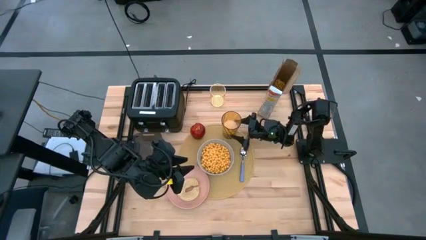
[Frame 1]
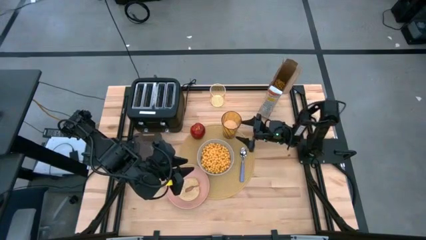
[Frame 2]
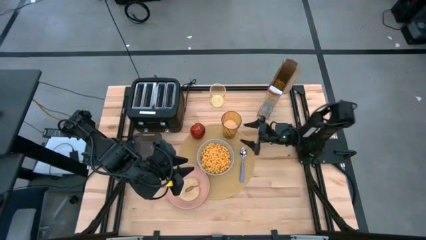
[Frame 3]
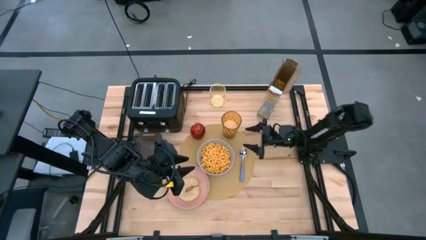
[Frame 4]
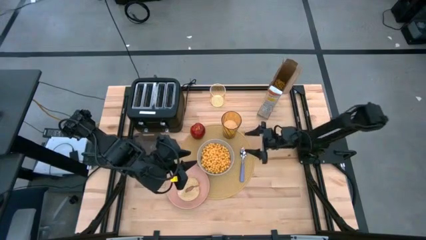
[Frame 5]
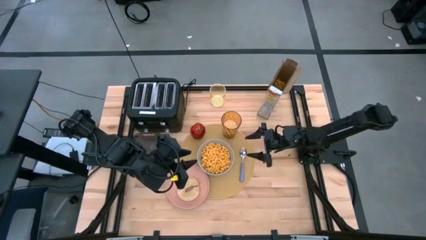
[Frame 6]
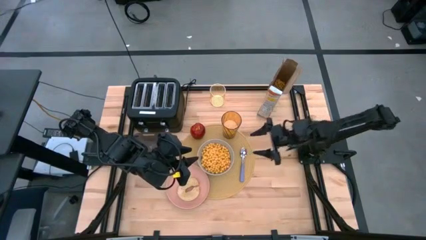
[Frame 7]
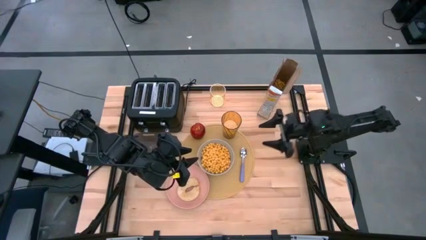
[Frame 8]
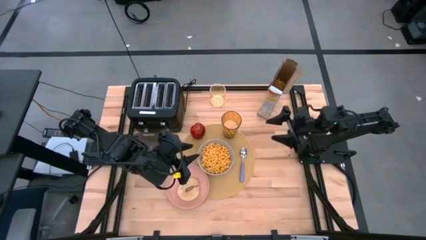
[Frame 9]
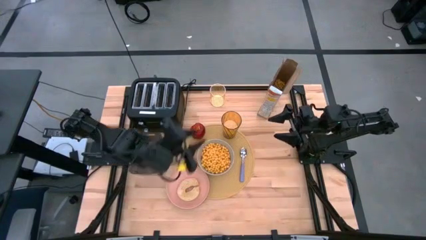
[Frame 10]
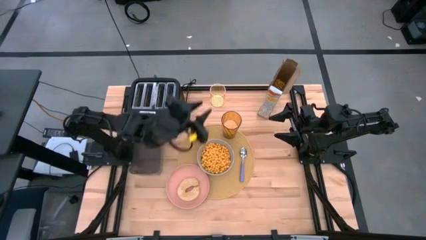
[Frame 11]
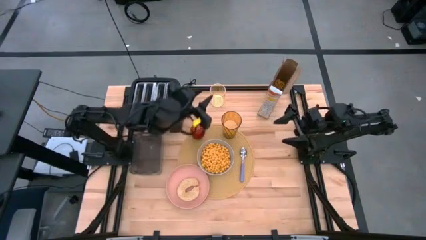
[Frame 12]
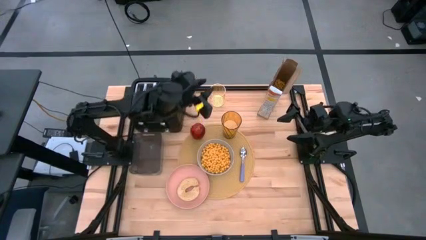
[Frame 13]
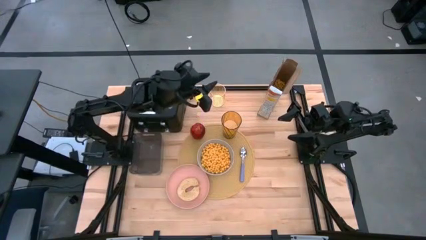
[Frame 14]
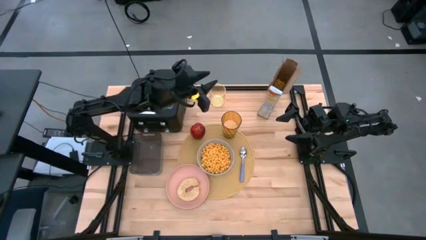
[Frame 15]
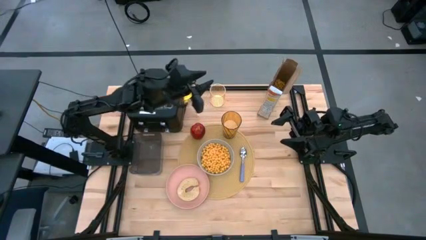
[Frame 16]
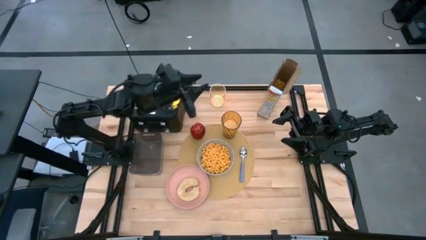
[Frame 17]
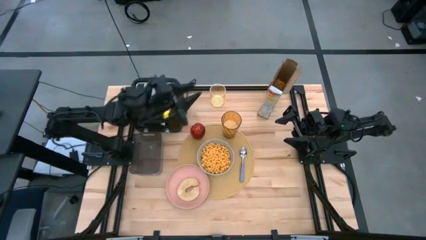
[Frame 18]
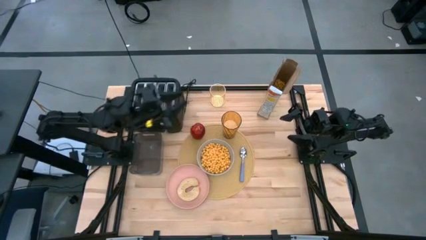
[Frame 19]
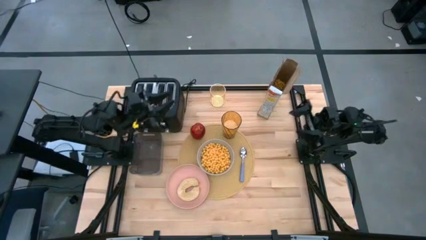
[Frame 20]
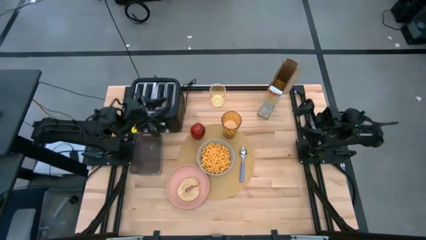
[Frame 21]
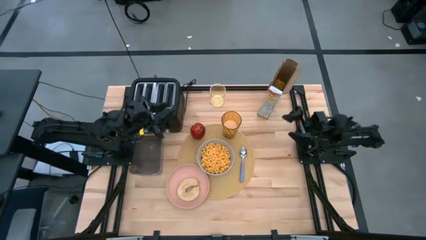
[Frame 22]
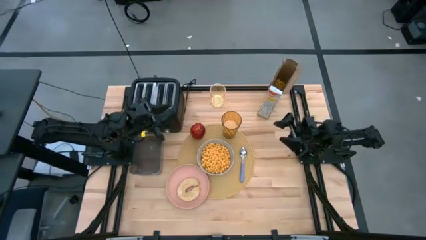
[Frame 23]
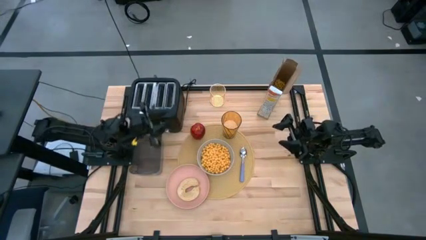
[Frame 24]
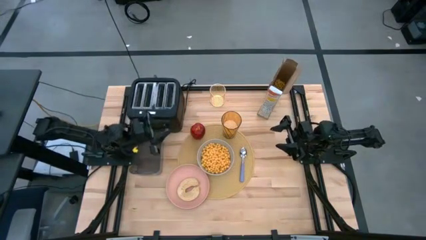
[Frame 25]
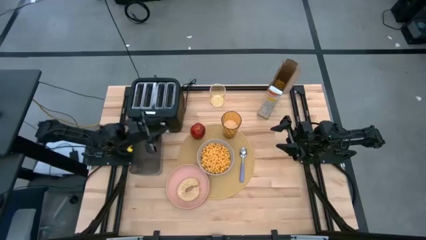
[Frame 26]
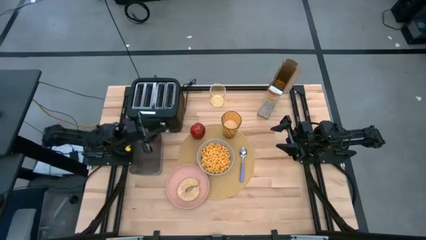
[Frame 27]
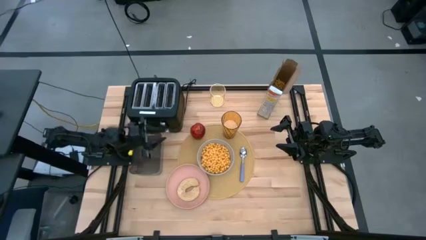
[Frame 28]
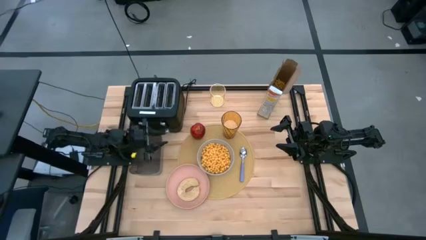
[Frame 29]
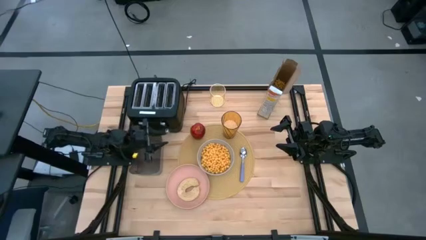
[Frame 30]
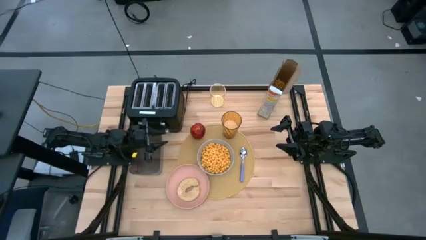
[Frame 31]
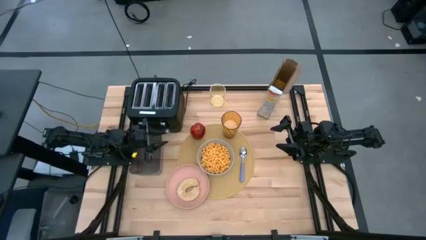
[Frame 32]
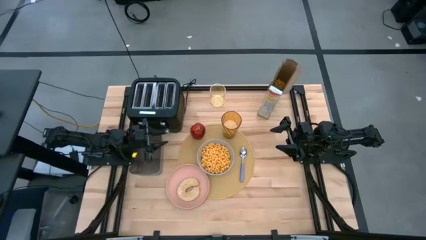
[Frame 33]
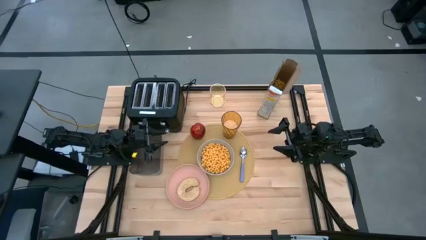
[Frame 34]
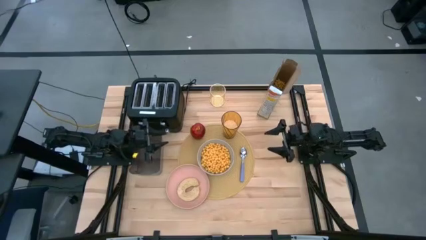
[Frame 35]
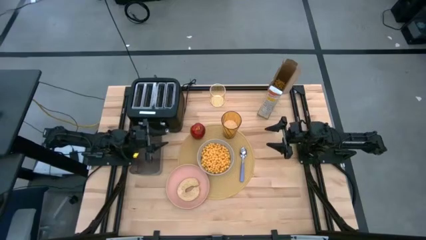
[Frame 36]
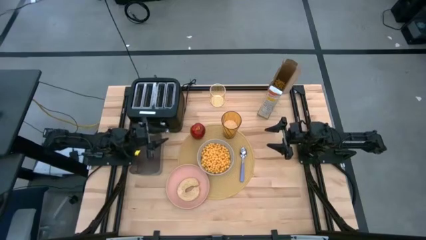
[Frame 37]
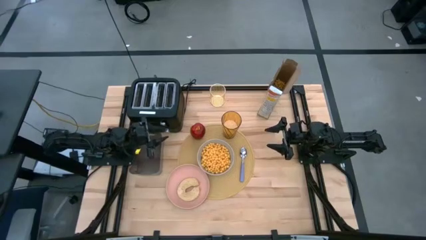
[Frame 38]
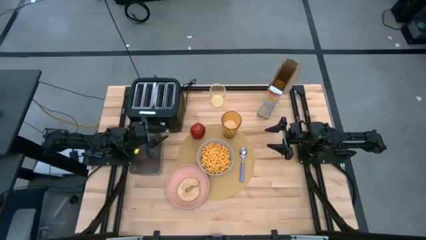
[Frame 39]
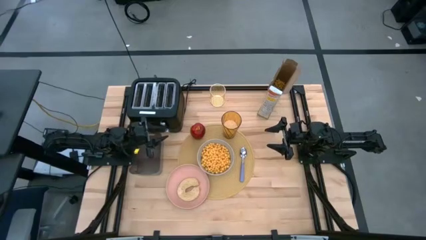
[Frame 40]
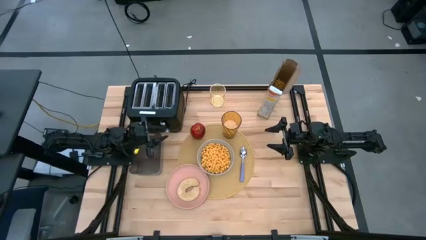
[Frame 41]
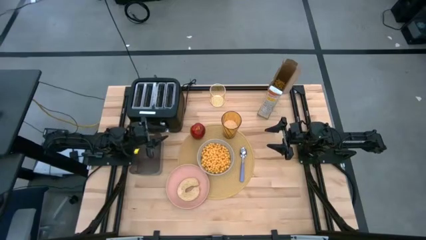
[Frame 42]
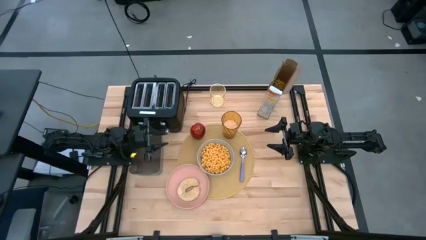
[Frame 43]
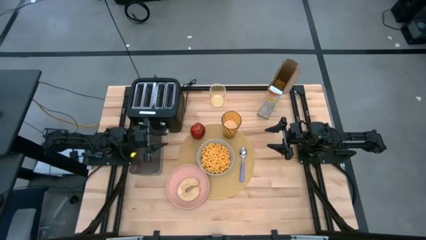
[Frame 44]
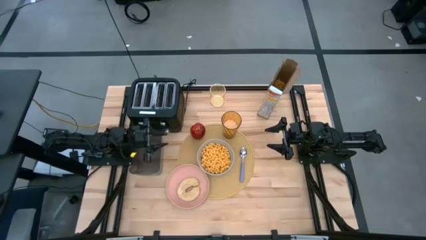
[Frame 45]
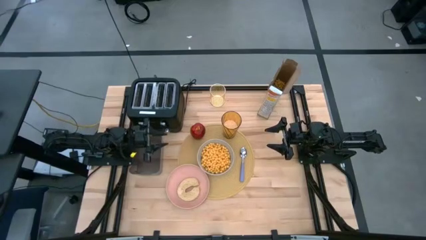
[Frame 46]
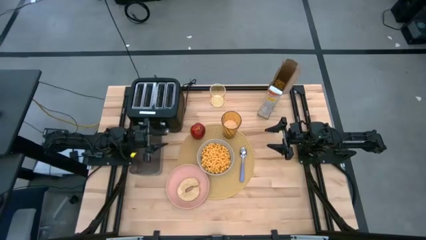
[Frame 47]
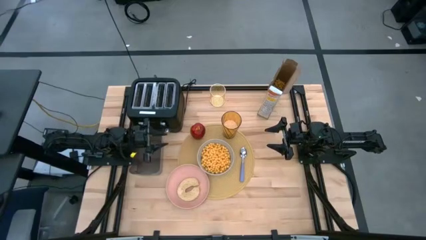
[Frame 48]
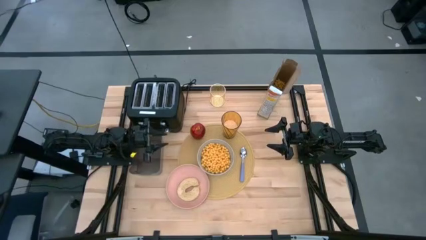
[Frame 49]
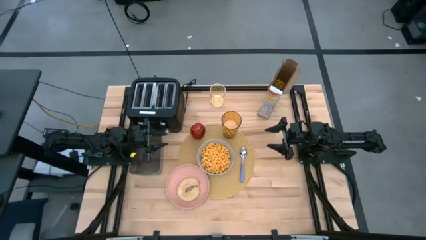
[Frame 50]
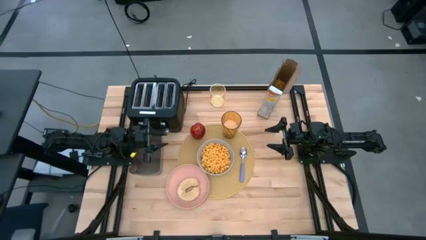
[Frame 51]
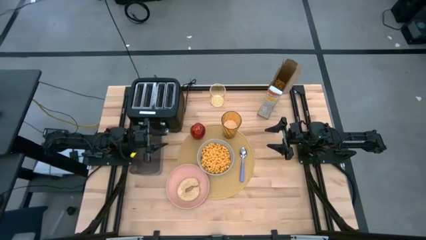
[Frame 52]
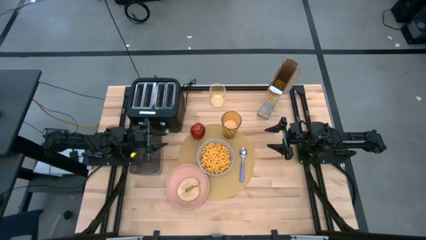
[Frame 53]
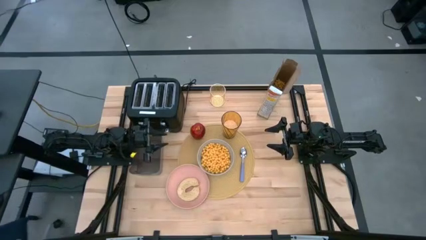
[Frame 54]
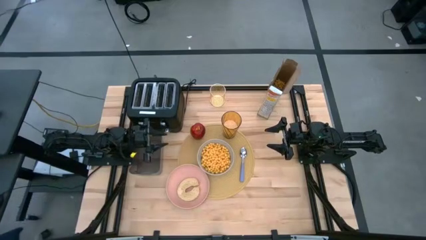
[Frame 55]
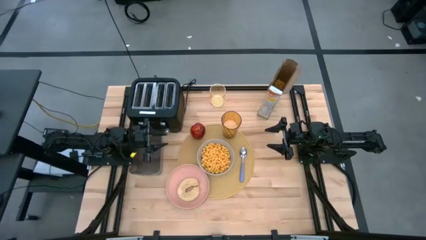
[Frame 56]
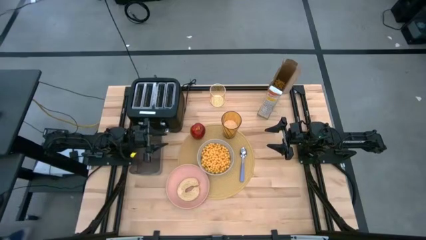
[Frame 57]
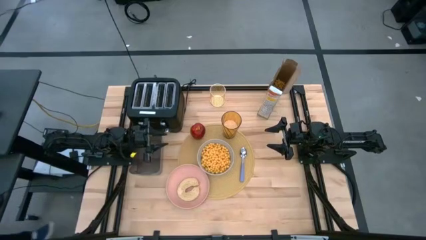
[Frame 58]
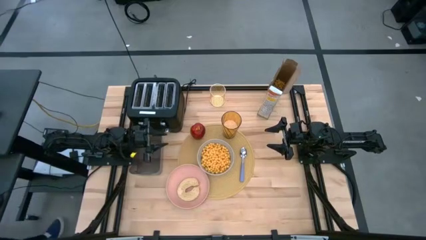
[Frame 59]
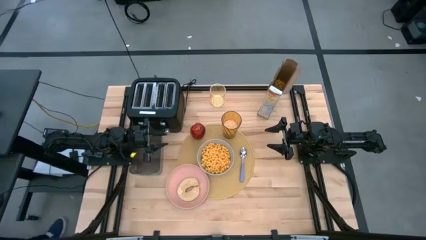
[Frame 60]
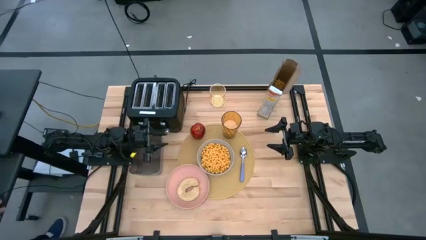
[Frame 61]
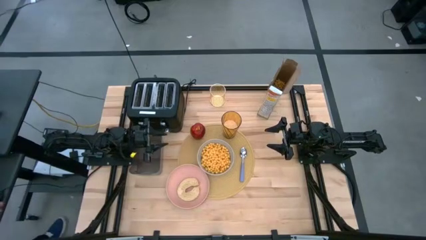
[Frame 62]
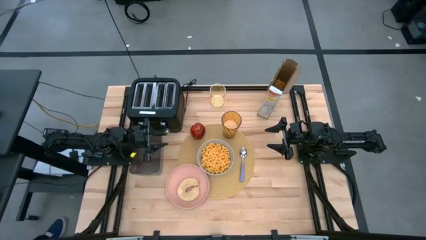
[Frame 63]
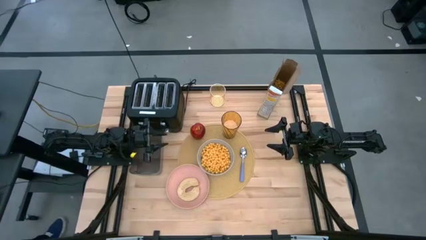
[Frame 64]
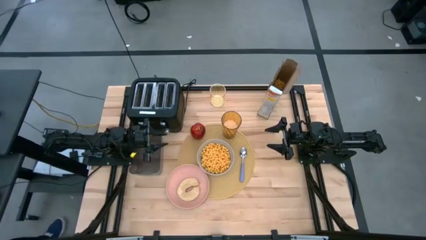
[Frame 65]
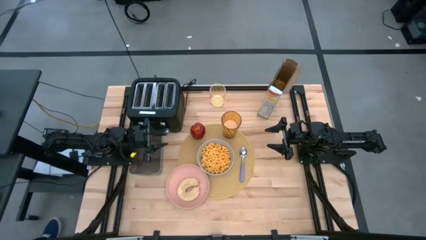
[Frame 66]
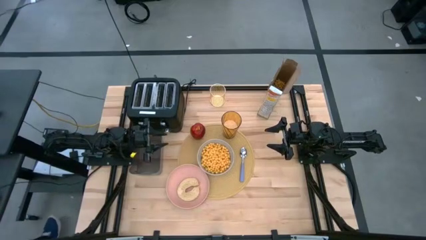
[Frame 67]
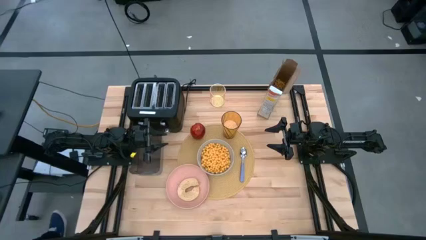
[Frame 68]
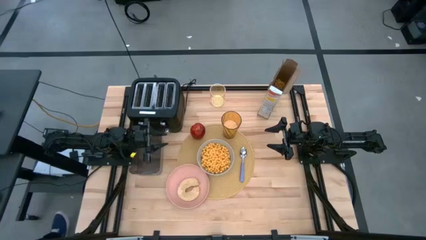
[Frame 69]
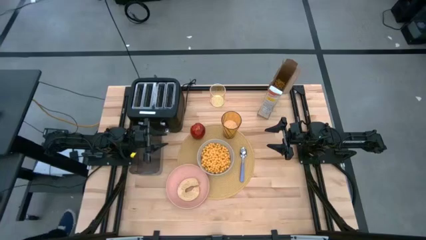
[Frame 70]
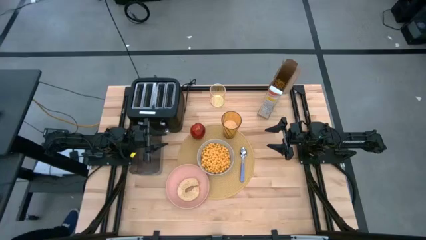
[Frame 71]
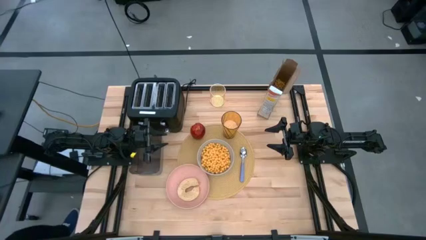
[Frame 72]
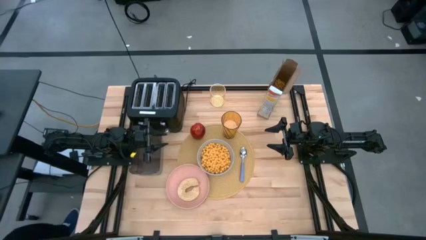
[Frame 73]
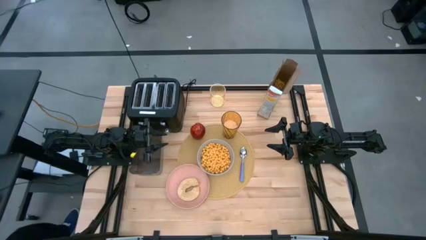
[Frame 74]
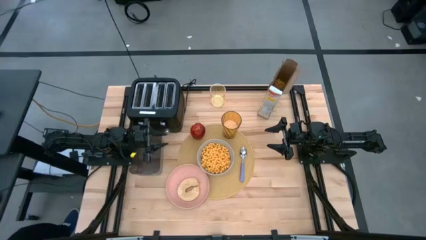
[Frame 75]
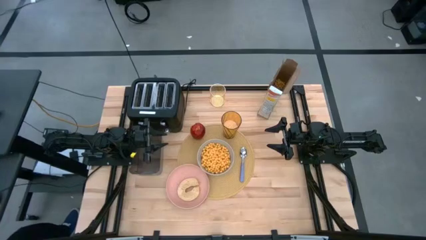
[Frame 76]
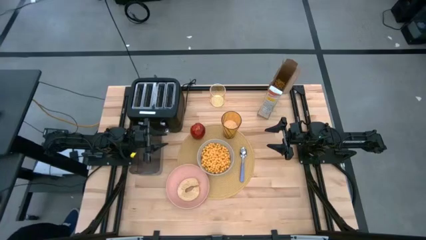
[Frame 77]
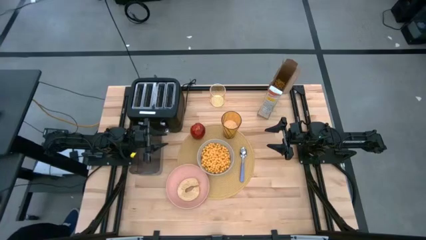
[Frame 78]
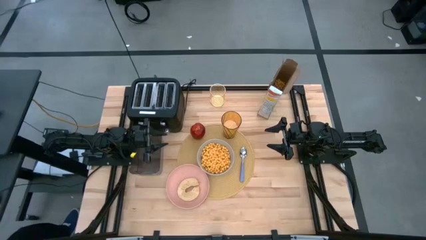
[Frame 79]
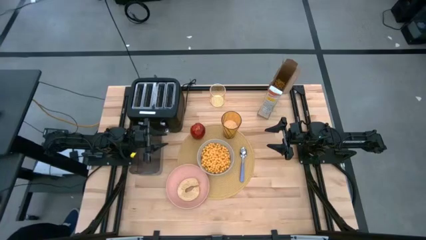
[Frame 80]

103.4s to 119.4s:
Task: Arrange a breakfast setting
Return to Home Position

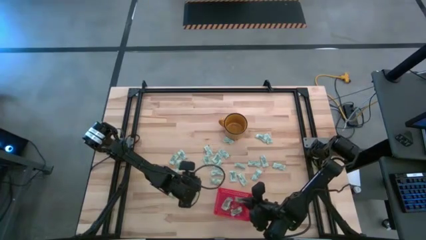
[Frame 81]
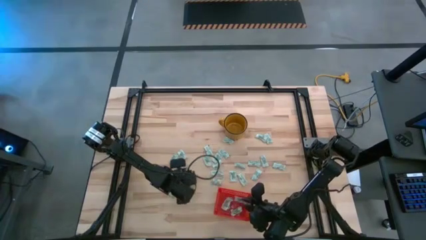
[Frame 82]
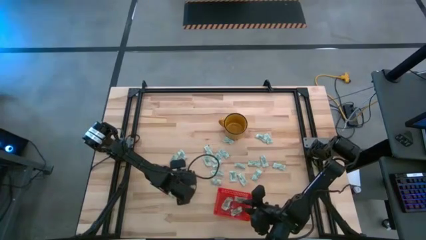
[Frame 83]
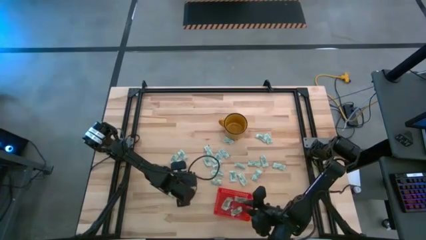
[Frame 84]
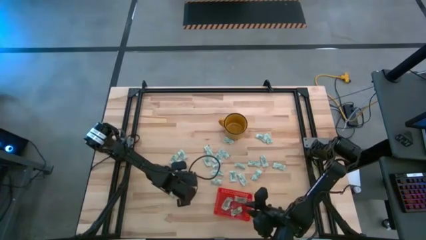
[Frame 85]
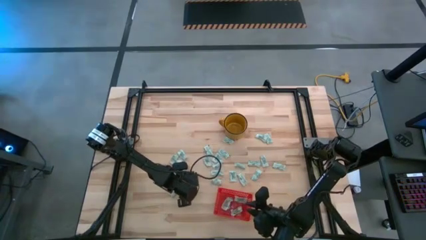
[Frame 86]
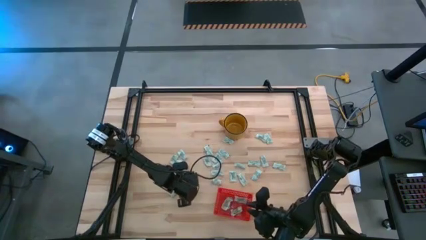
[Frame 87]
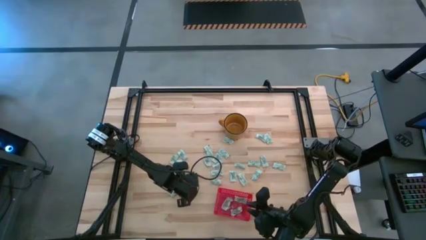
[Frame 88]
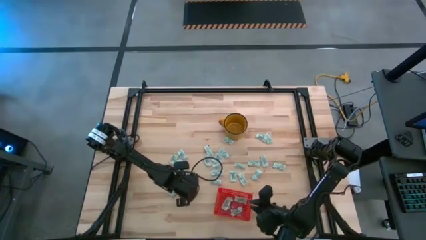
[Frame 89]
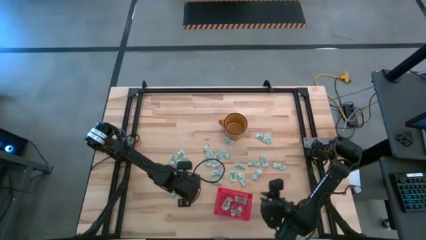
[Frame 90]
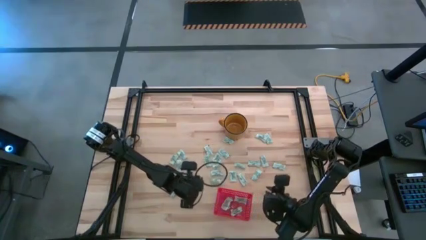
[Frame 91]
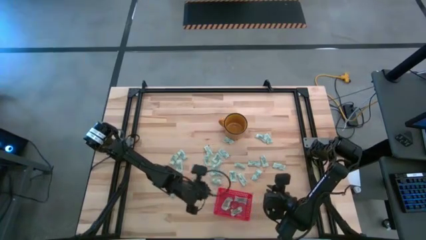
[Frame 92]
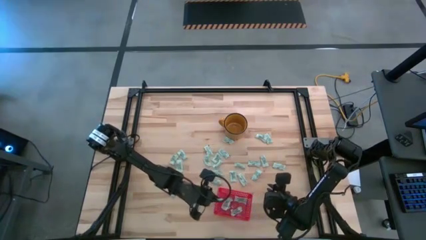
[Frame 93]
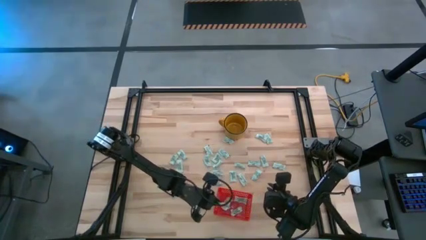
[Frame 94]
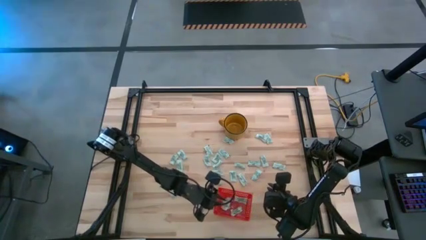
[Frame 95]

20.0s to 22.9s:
Task: Pick and place Stevia / Truvia into bins
Put the stevia packet into the bin
